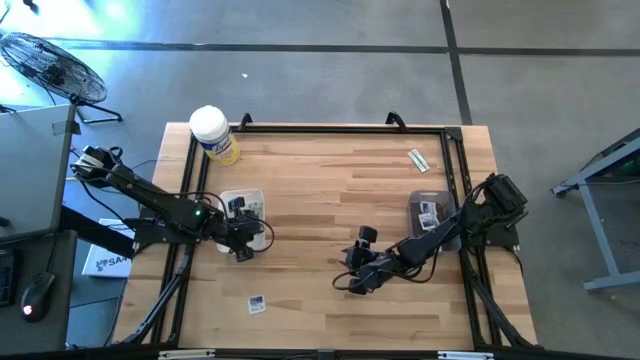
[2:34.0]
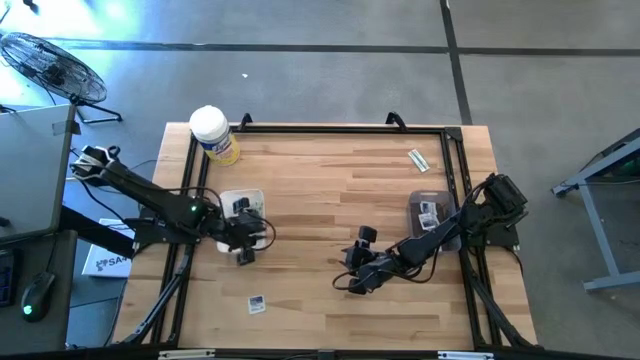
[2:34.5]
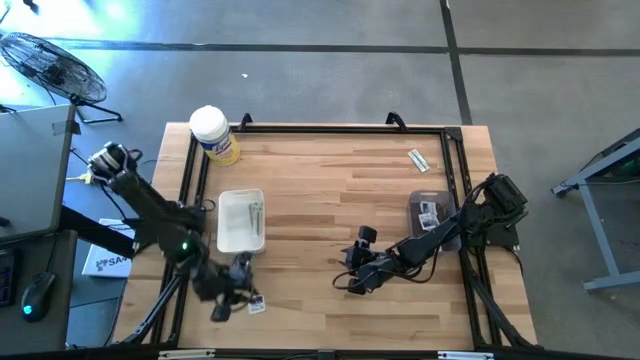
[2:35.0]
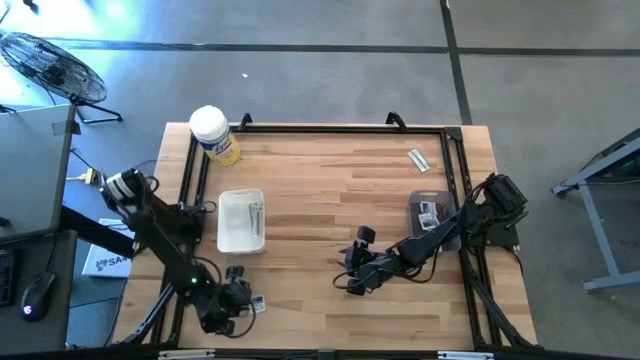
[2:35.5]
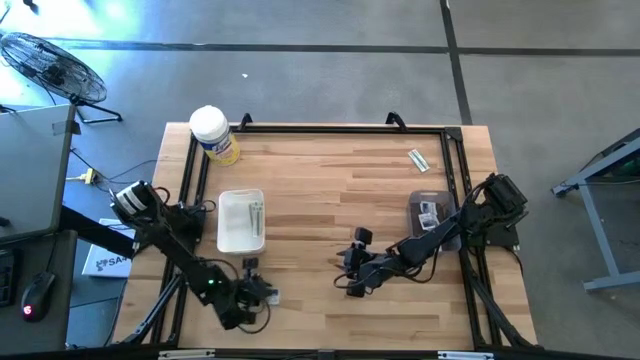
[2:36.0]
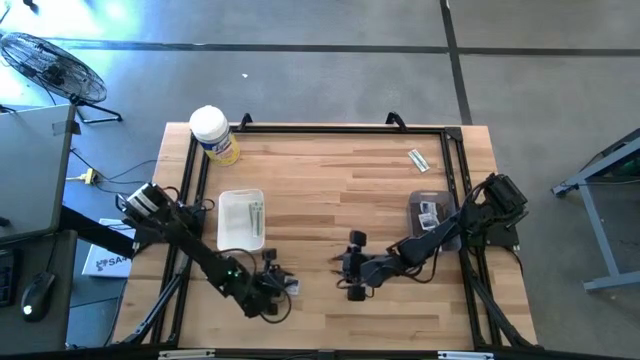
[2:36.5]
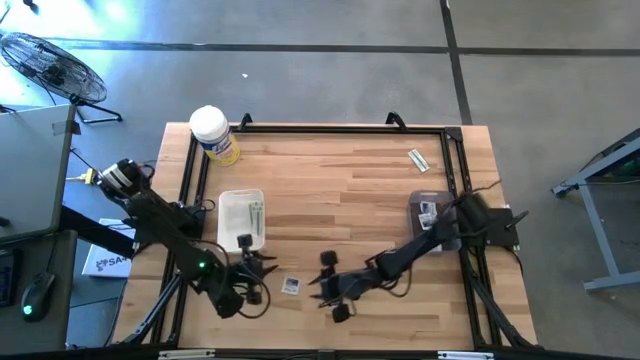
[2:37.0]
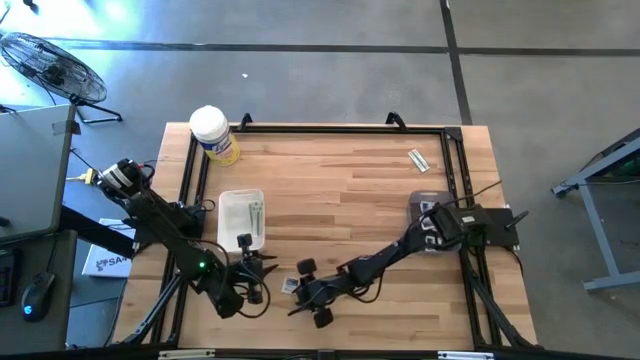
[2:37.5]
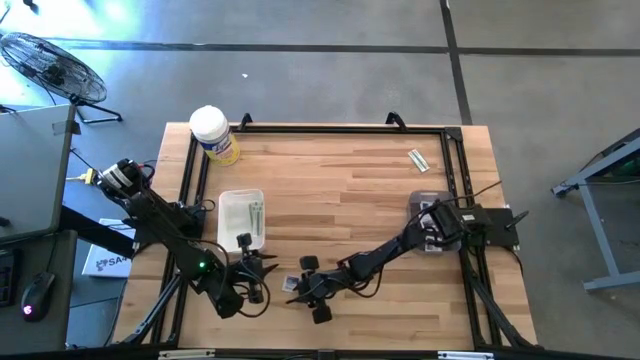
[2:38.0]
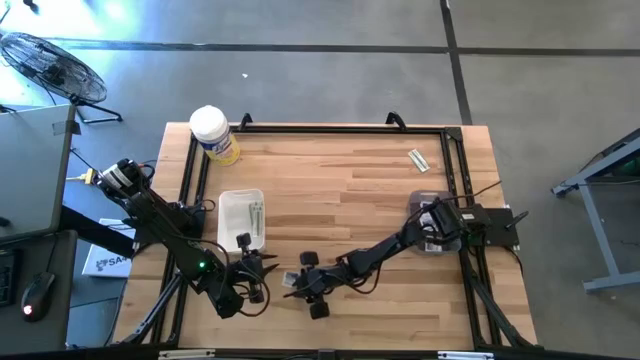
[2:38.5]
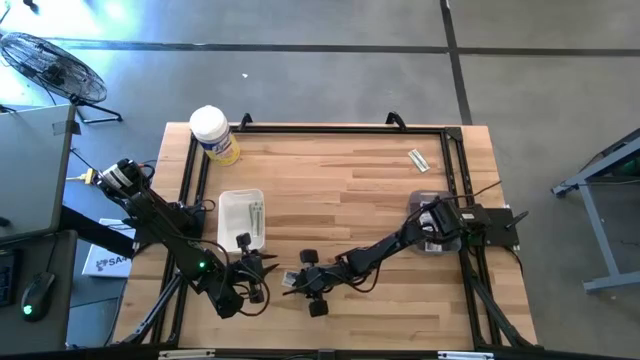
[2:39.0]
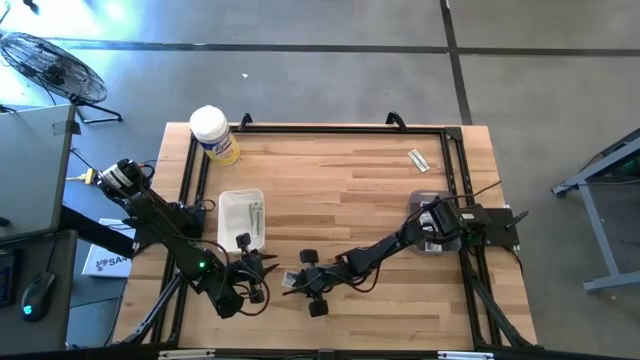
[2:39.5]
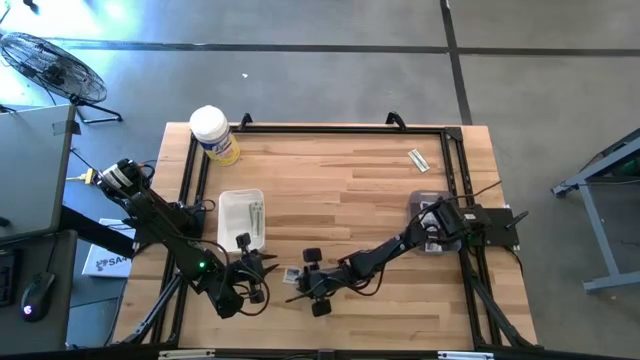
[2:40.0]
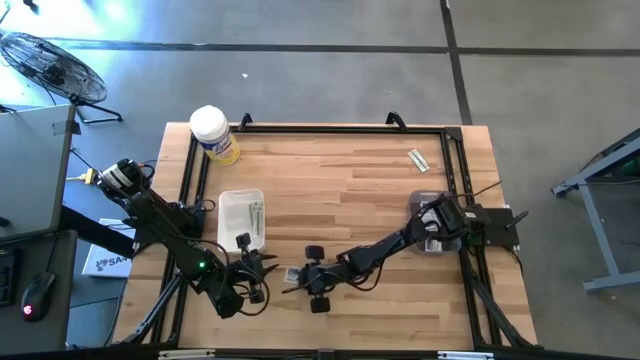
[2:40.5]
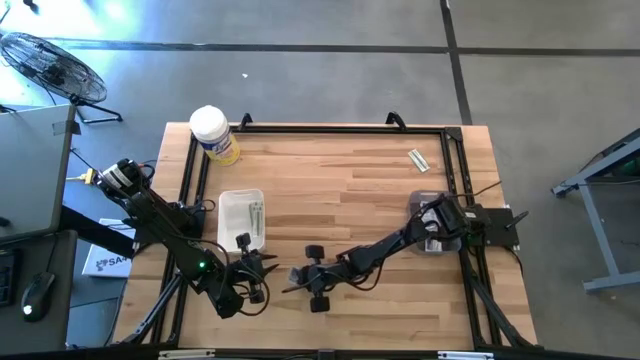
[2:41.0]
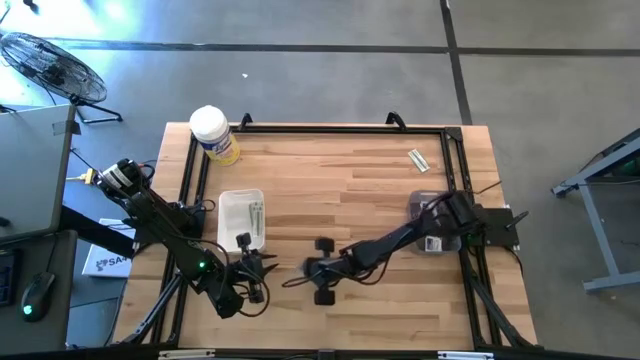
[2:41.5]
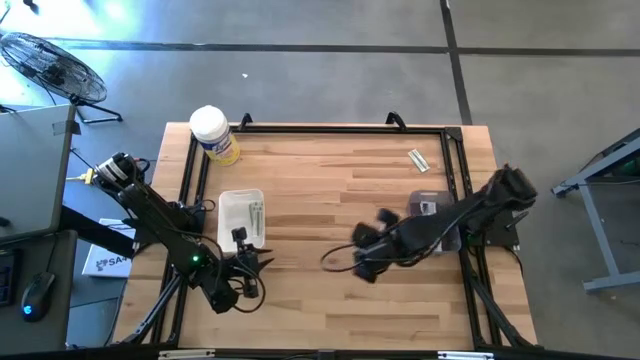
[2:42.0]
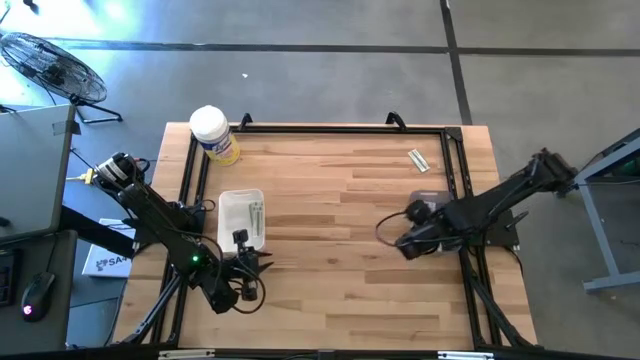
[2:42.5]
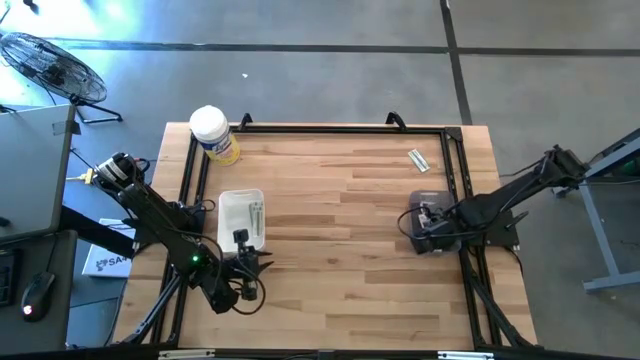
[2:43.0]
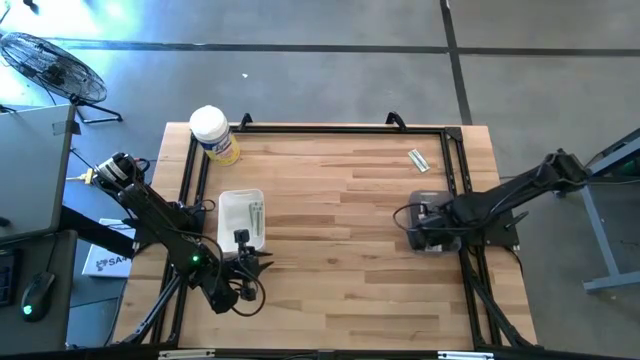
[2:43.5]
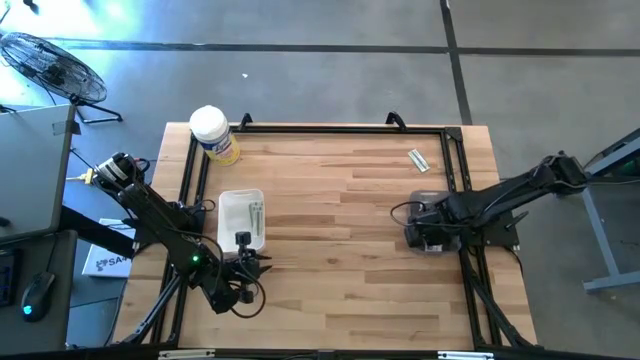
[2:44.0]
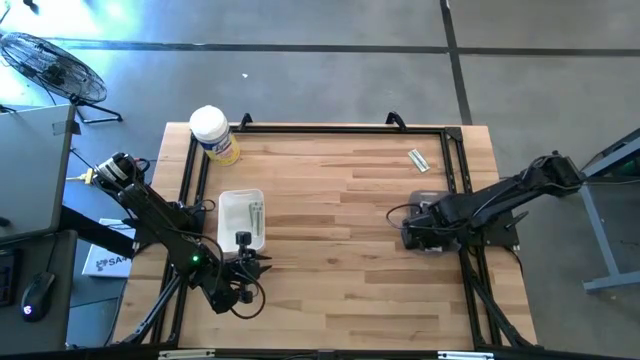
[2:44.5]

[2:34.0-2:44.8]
Task: Pick & Place First Aid Supplies
Put the blue alcohol pad into the black bin

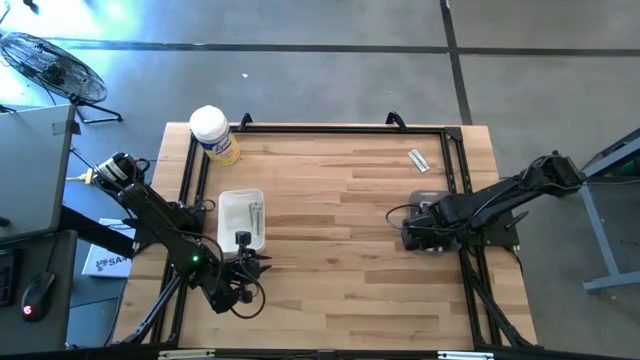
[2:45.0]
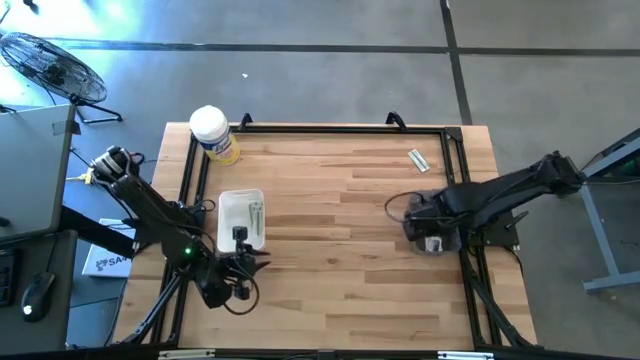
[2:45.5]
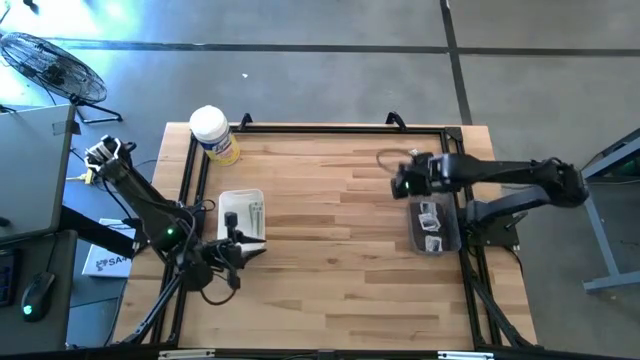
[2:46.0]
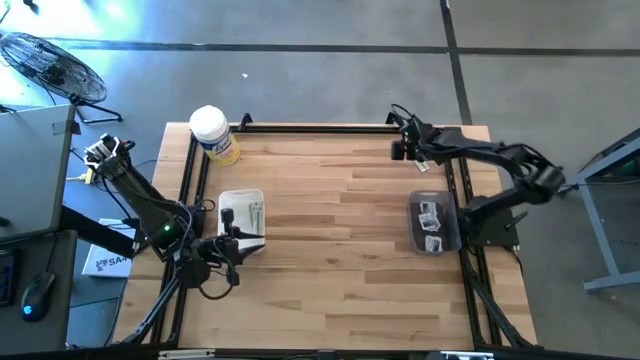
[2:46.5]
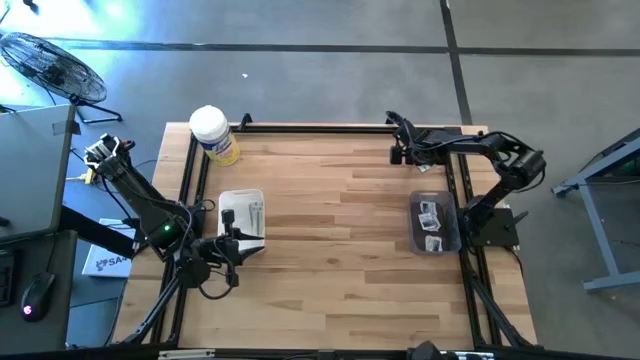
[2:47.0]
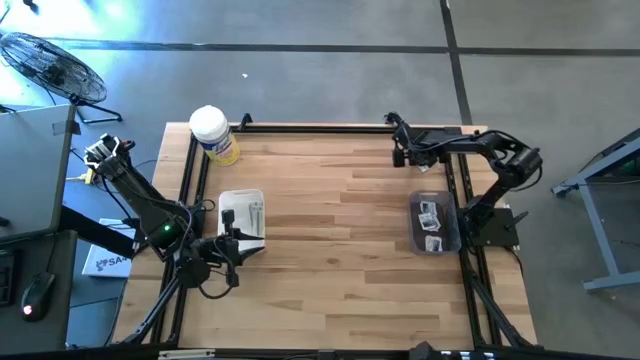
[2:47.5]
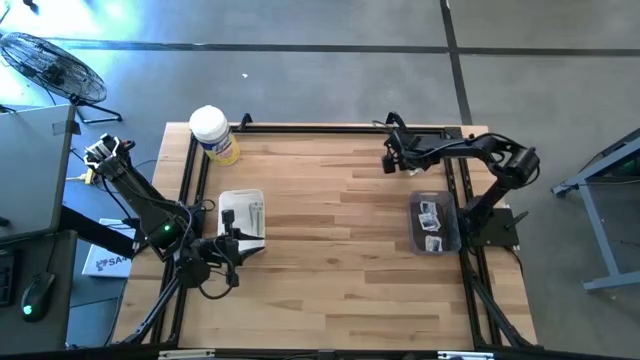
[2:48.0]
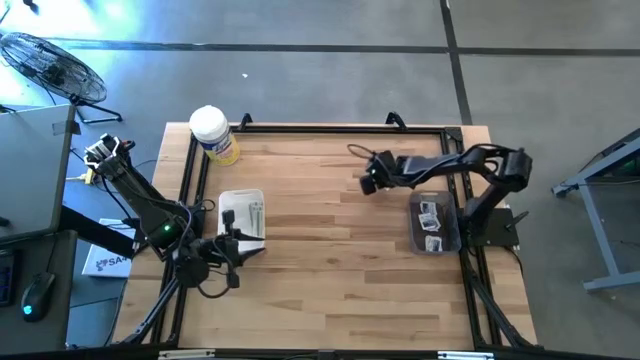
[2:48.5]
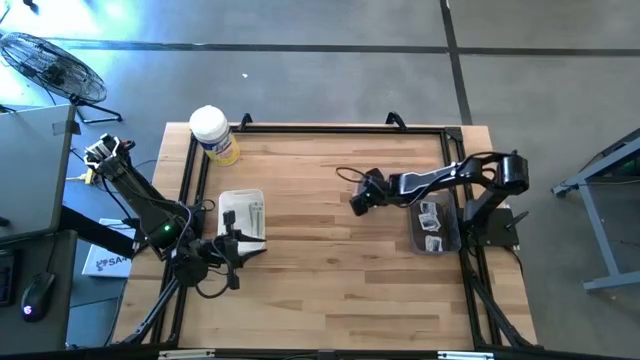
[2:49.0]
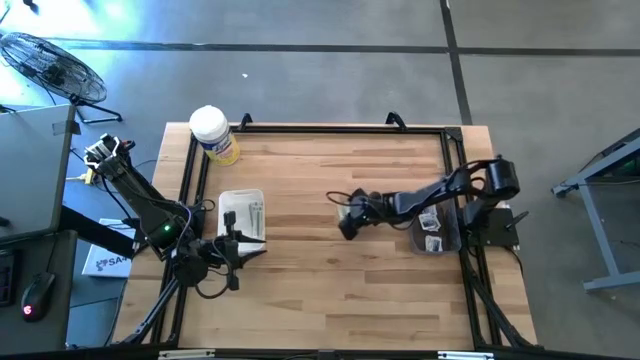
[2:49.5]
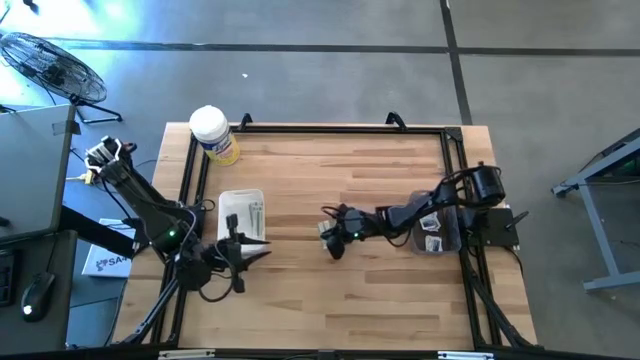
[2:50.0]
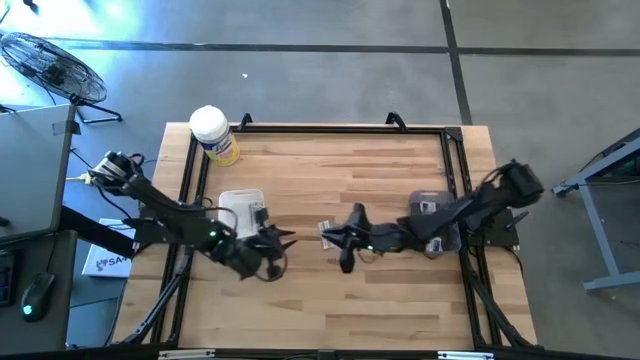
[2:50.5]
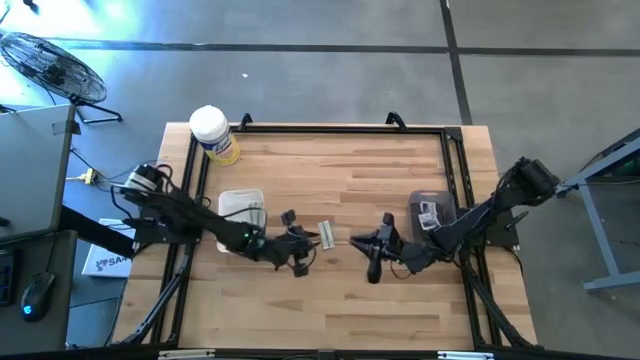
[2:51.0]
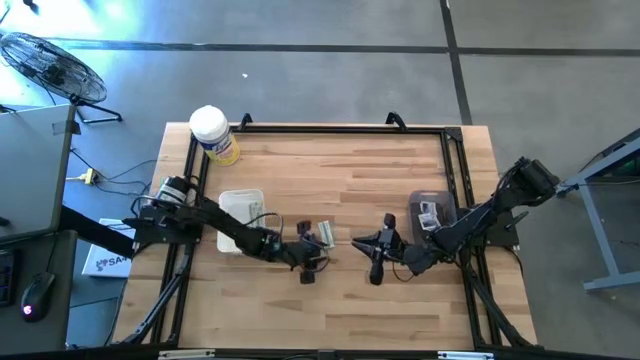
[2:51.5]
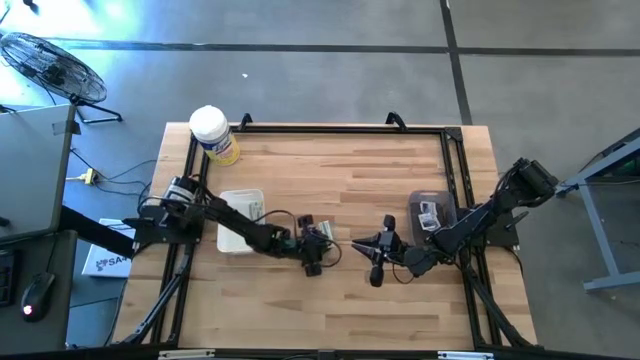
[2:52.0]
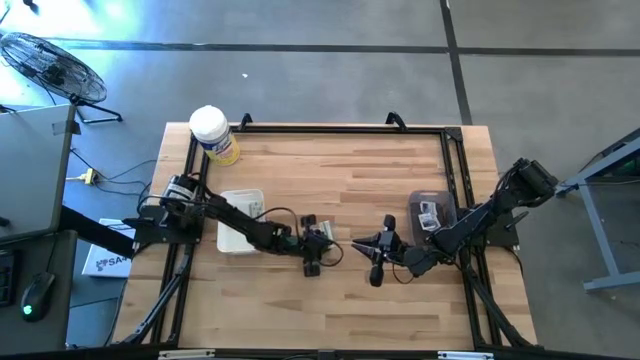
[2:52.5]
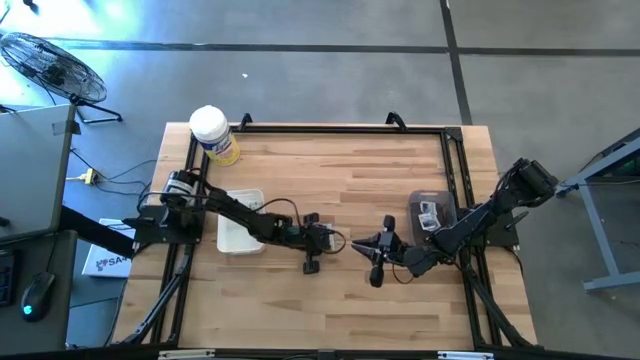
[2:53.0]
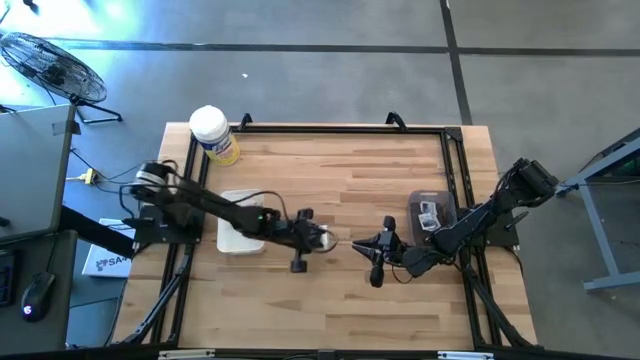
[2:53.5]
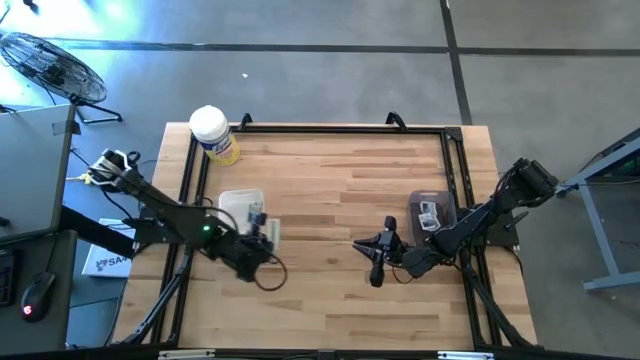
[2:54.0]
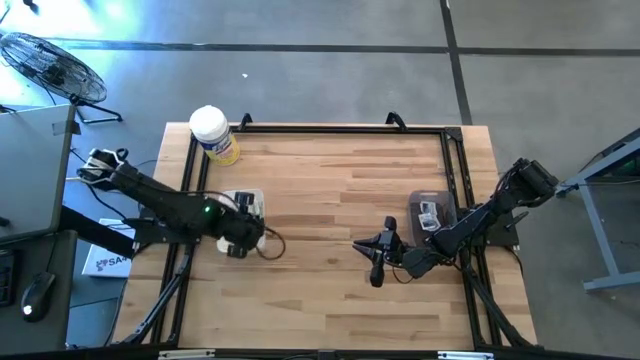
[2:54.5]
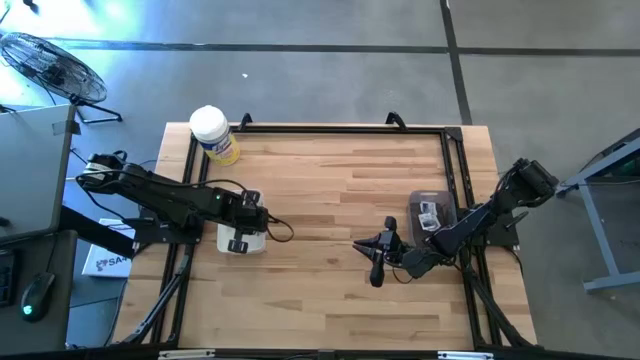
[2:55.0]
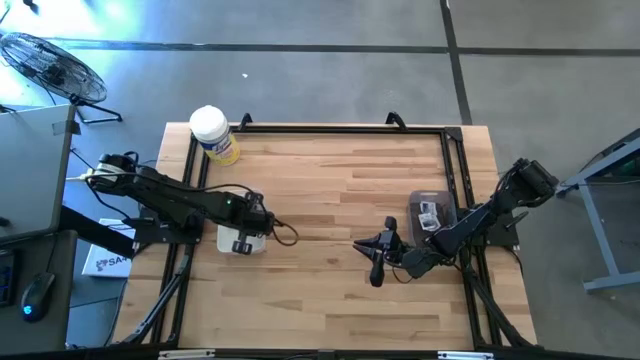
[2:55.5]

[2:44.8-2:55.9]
Put the green bandage into the white bin
